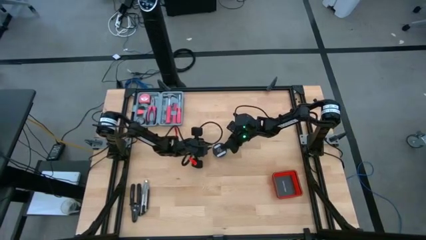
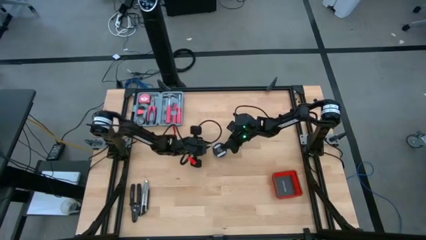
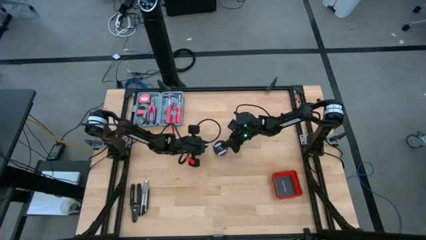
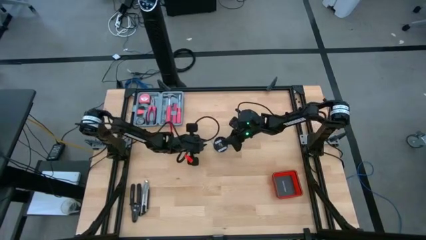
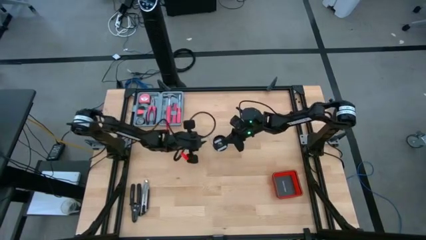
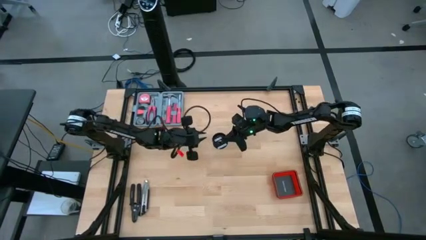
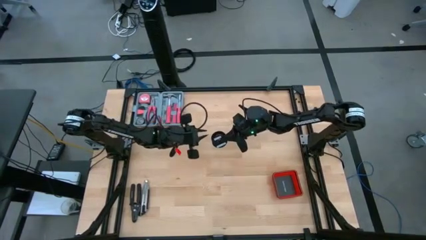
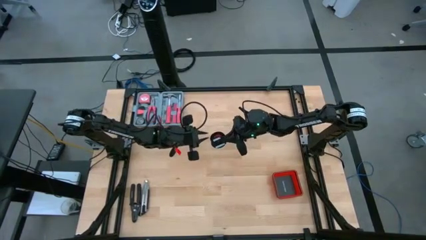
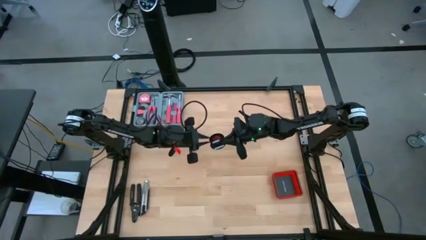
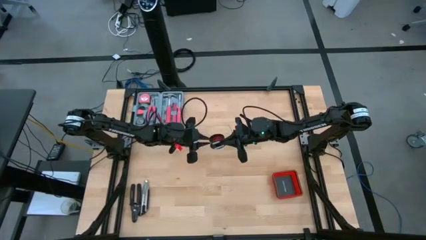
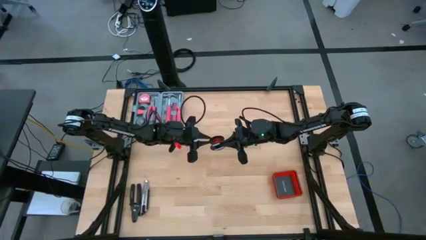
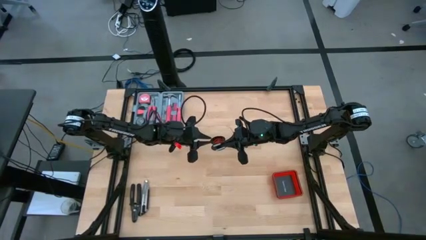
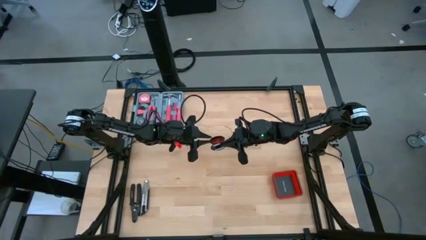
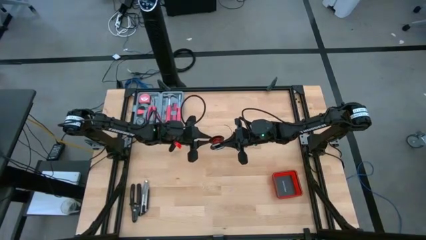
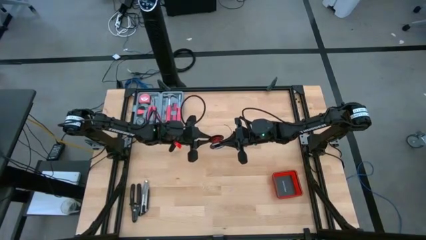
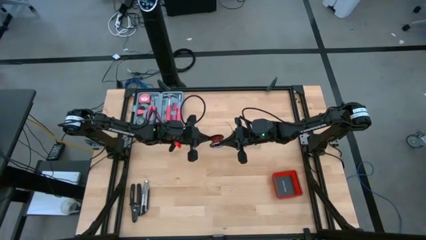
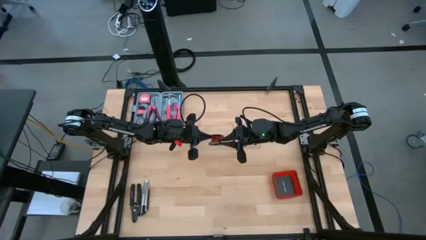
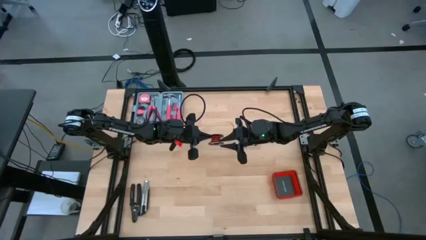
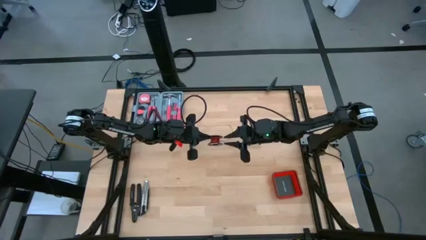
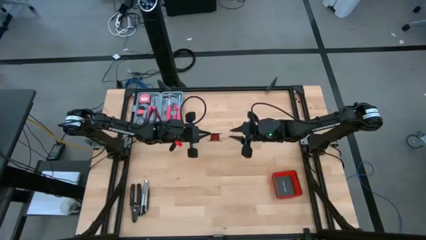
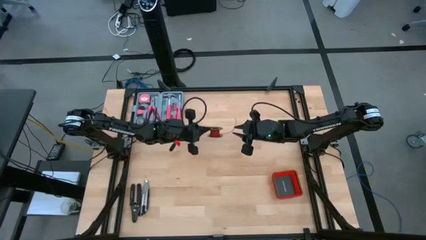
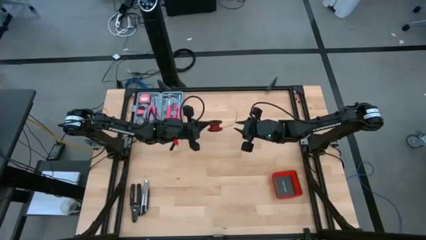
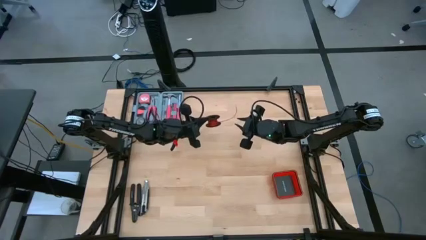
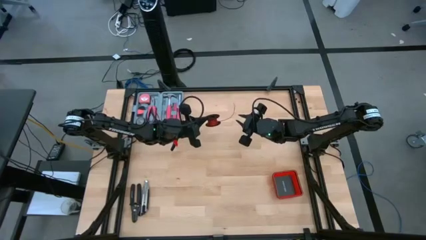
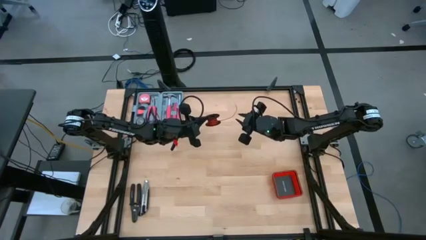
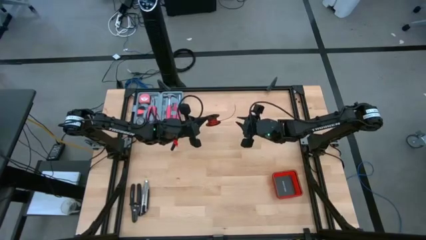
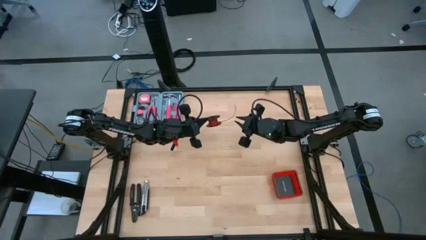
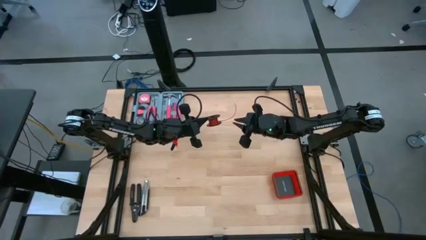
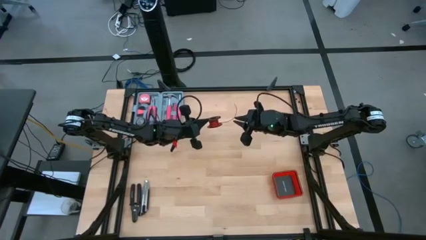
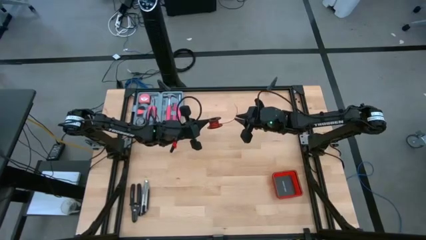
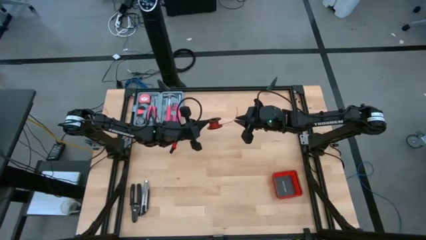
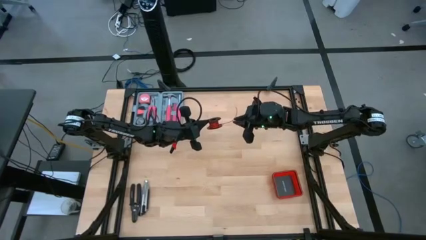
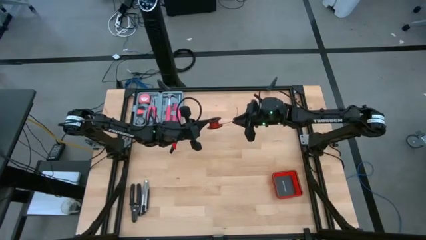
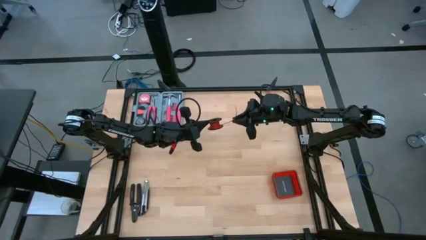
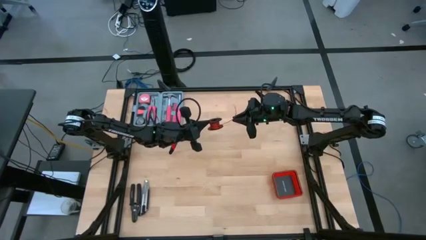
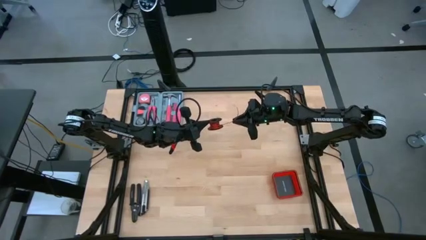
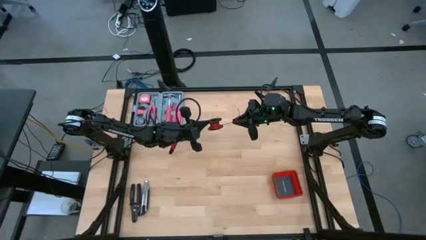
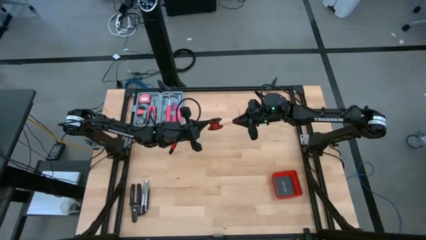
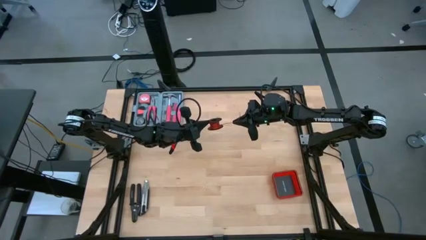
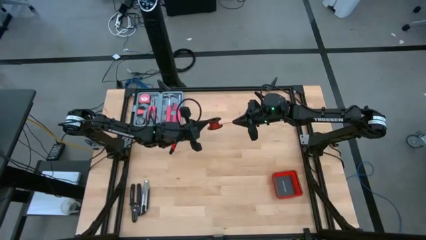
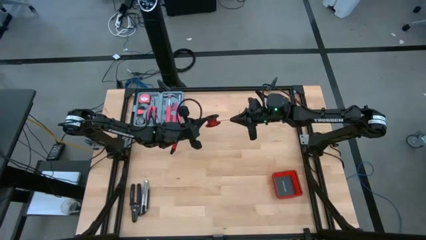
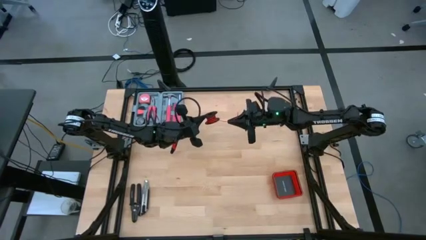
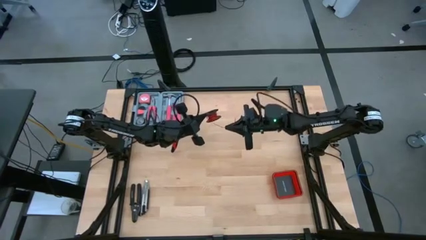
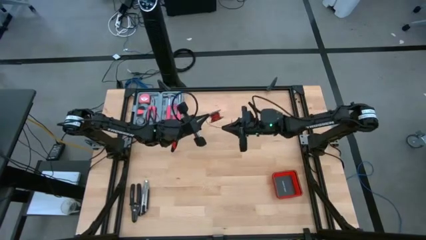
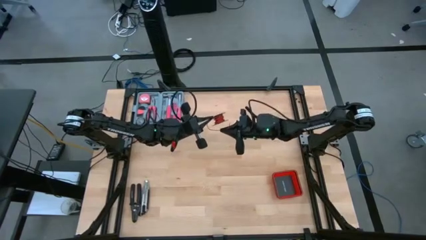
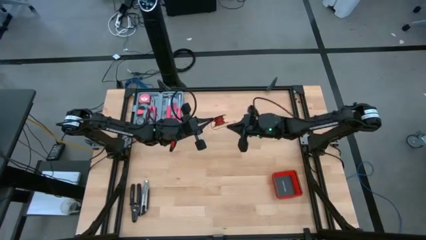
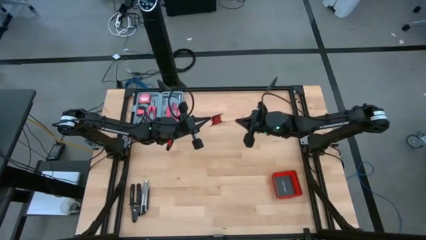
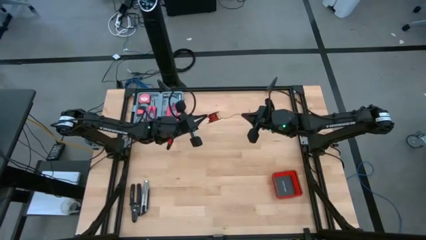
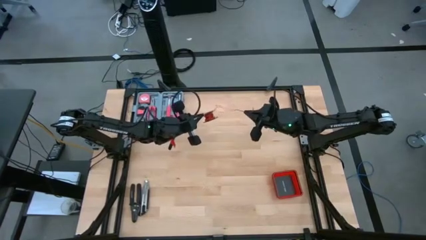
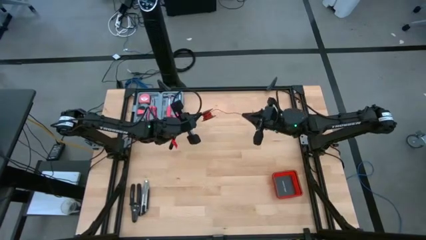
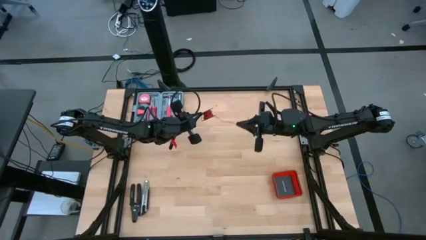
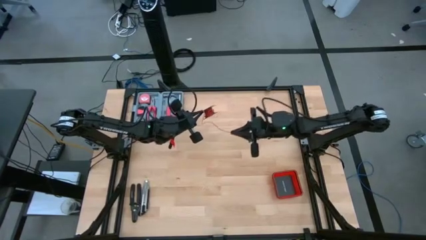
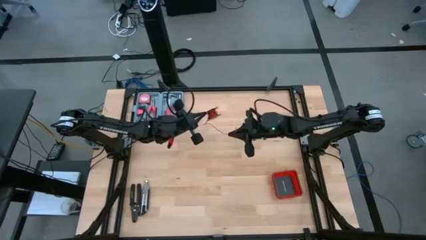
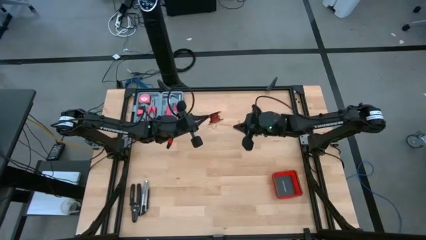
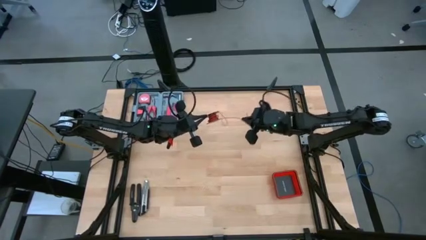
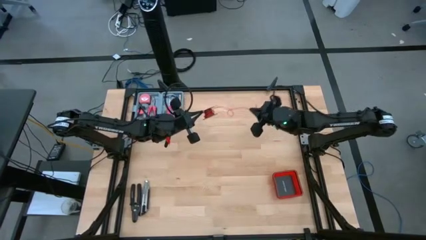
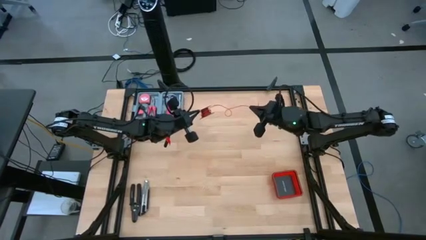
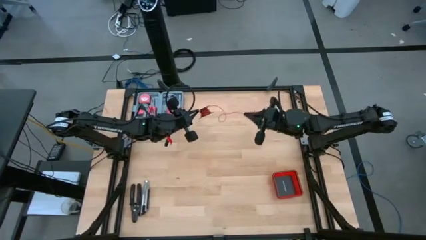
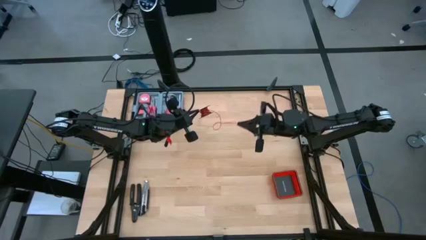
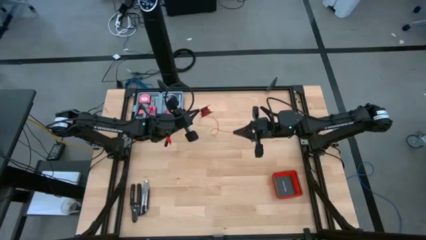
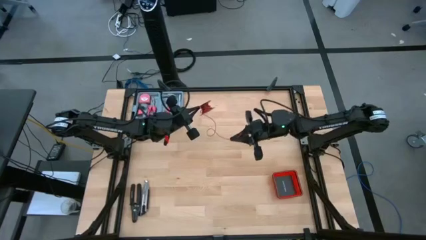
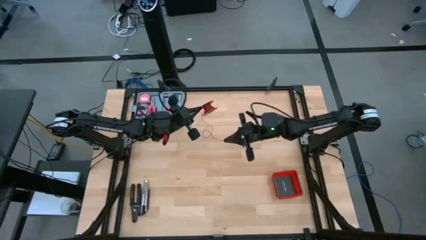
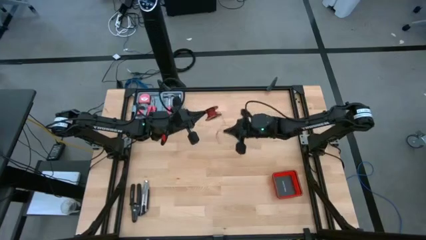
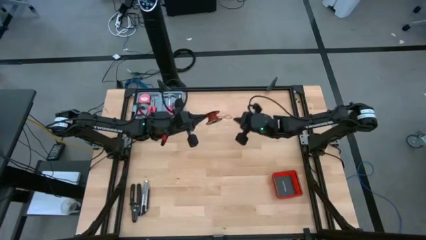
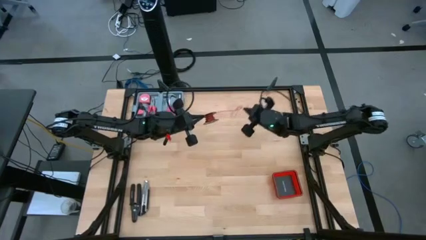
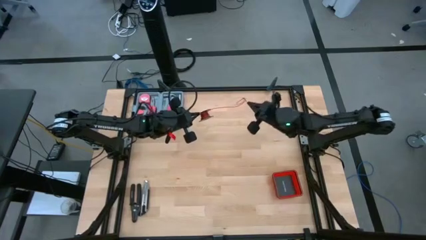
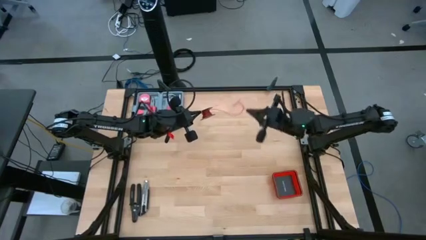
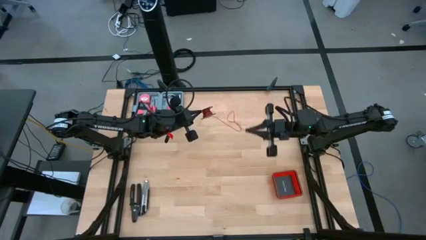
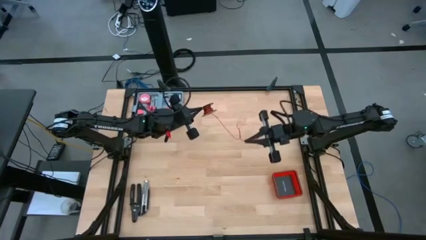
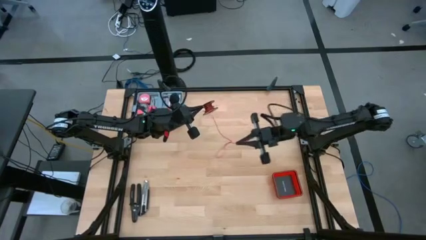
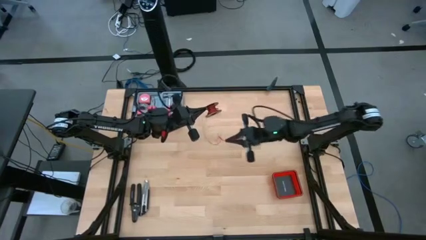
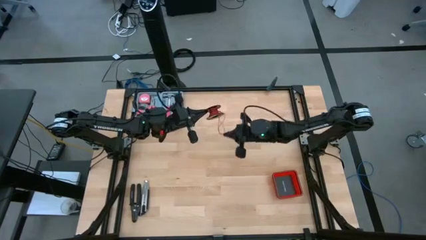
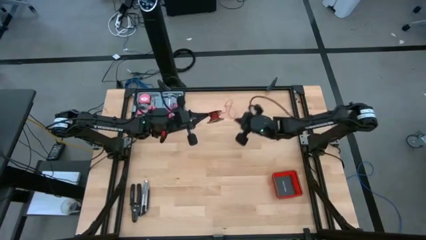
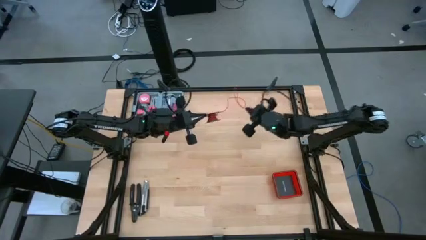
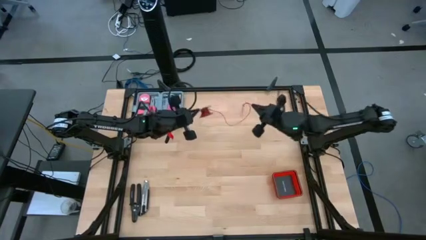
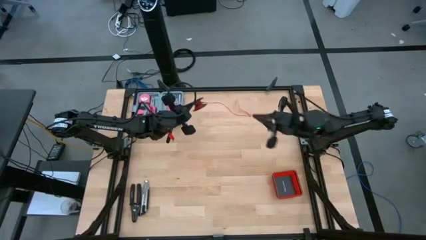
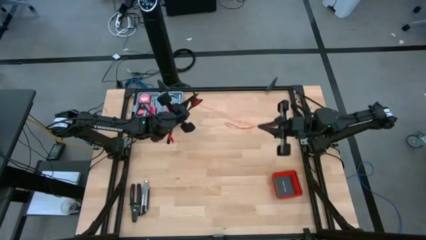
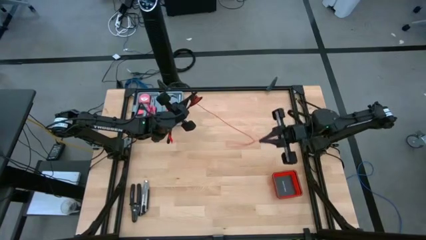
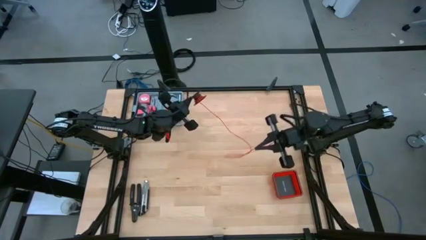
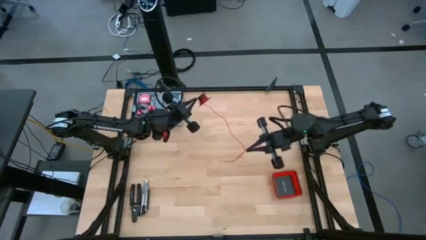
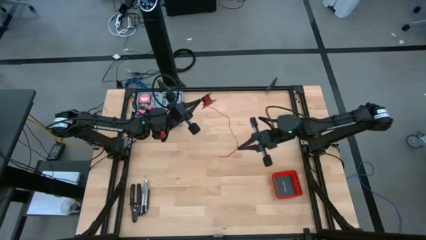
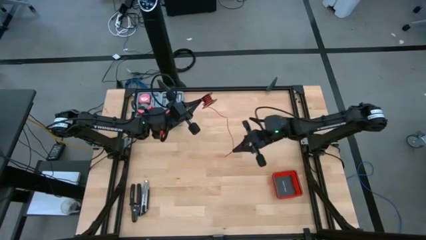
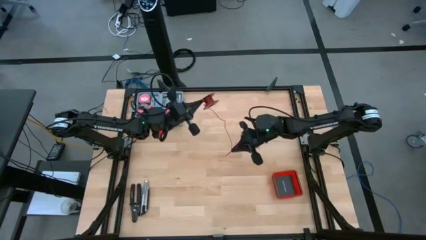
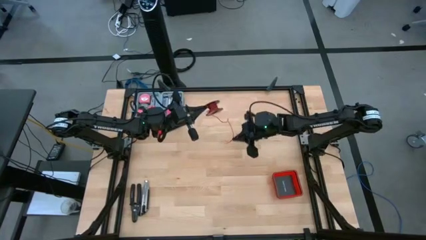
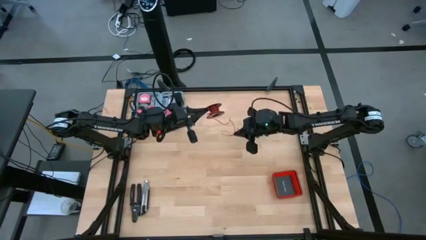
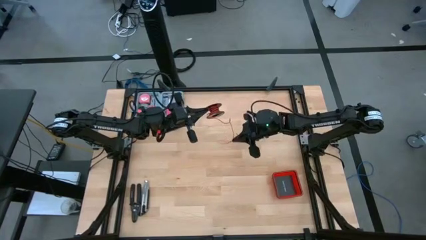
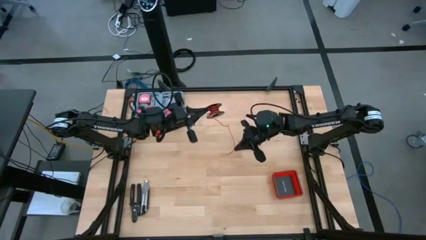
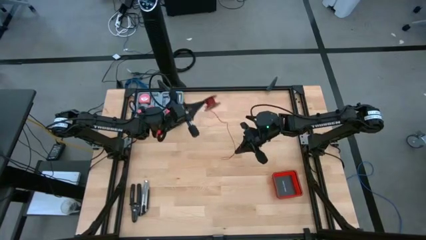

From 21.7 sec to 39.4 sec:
Task: Coil cords
Uncoil the red wire from the spool
